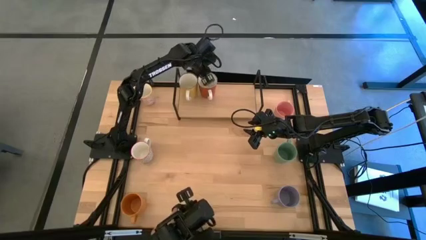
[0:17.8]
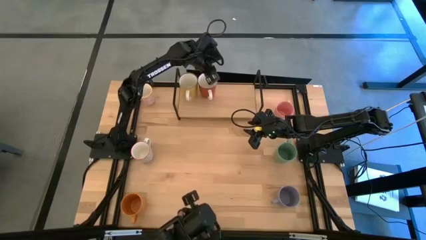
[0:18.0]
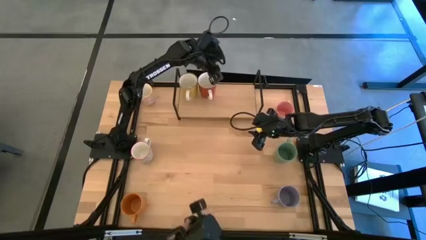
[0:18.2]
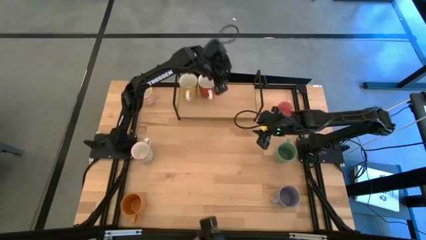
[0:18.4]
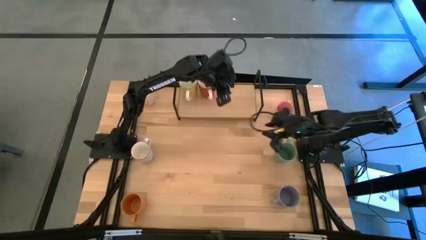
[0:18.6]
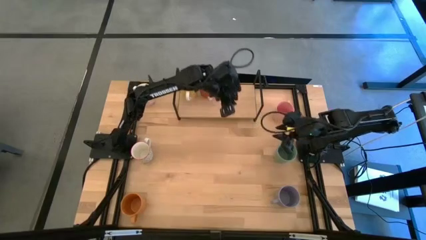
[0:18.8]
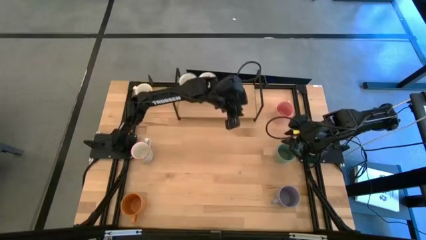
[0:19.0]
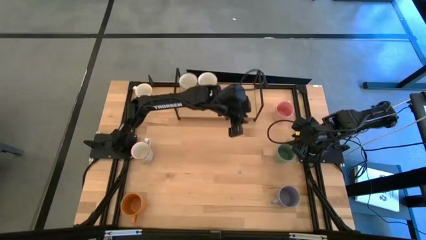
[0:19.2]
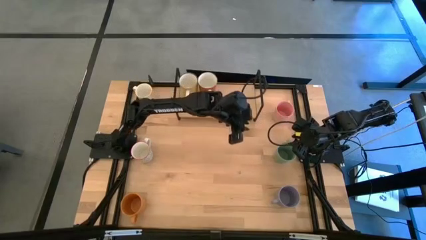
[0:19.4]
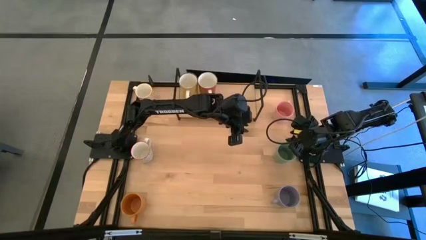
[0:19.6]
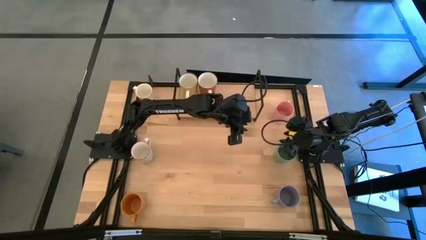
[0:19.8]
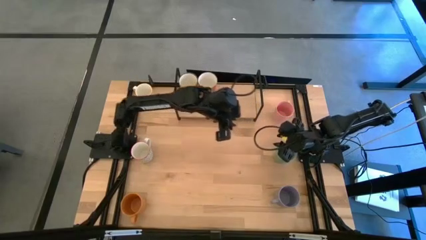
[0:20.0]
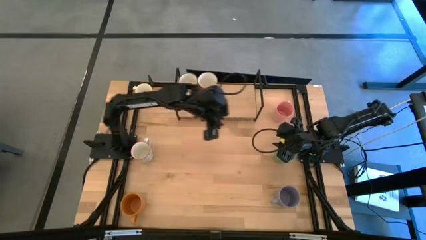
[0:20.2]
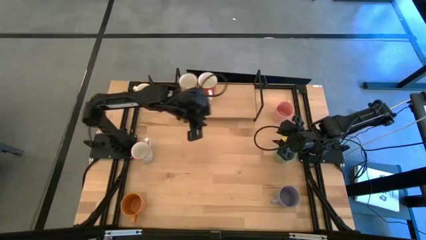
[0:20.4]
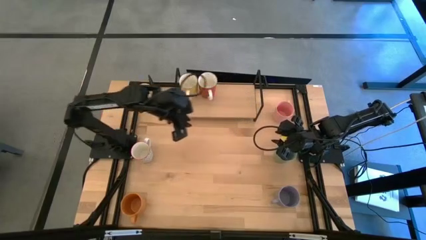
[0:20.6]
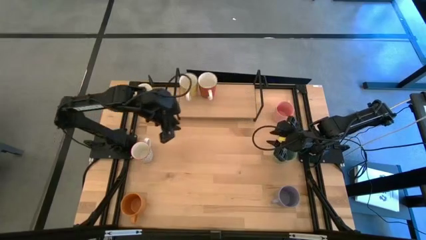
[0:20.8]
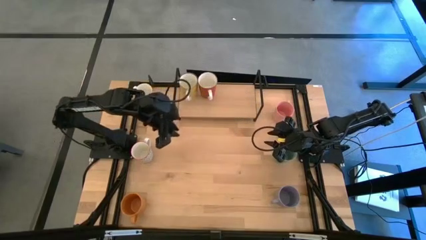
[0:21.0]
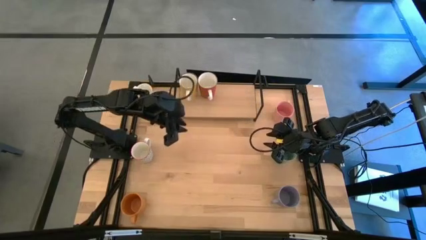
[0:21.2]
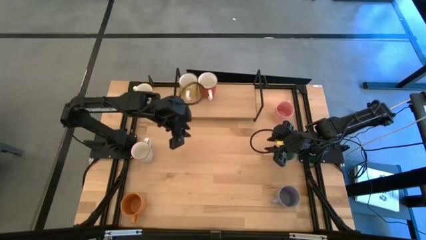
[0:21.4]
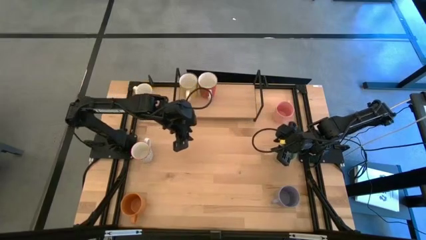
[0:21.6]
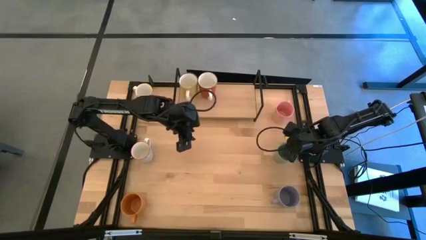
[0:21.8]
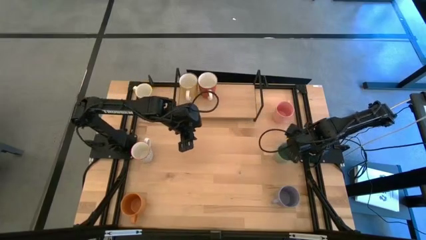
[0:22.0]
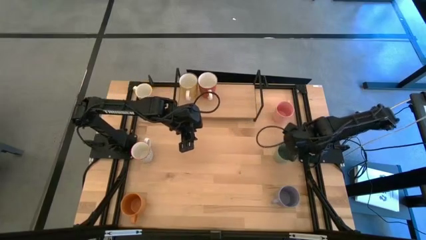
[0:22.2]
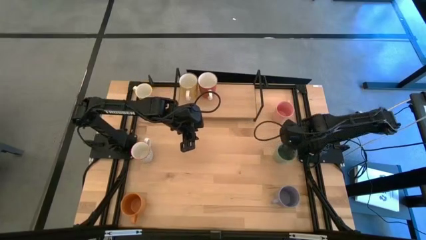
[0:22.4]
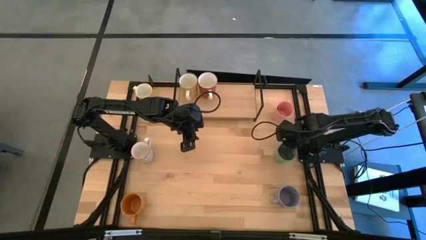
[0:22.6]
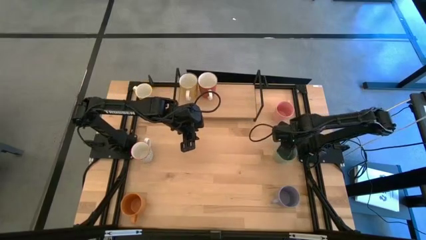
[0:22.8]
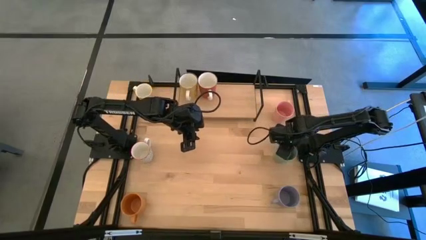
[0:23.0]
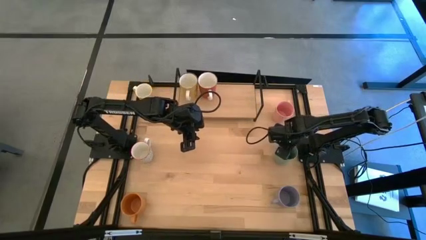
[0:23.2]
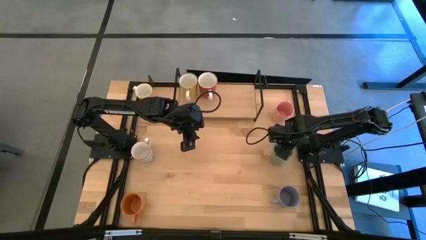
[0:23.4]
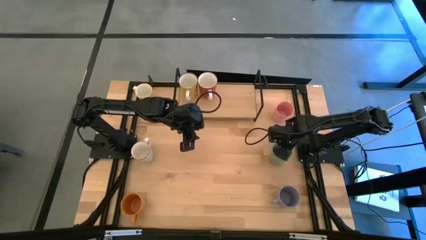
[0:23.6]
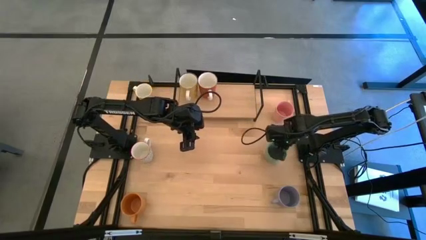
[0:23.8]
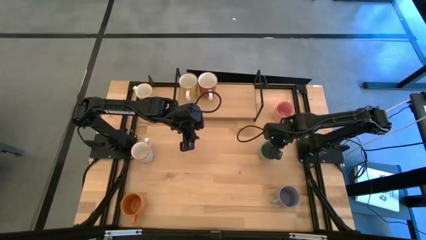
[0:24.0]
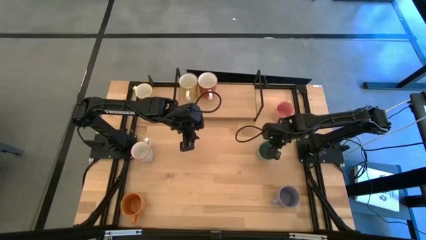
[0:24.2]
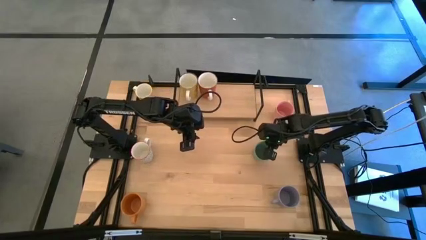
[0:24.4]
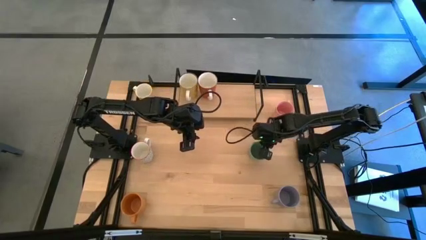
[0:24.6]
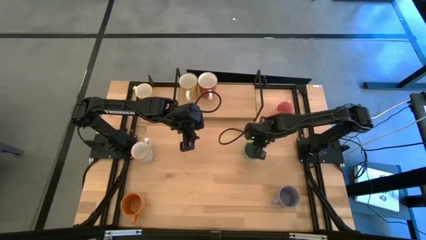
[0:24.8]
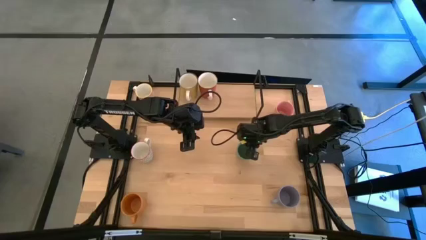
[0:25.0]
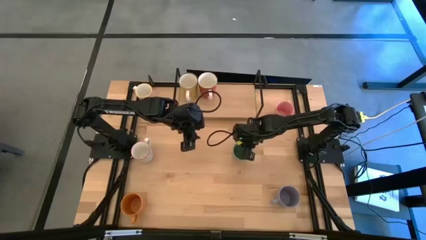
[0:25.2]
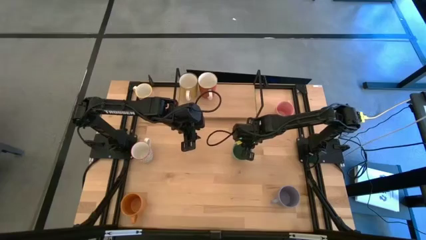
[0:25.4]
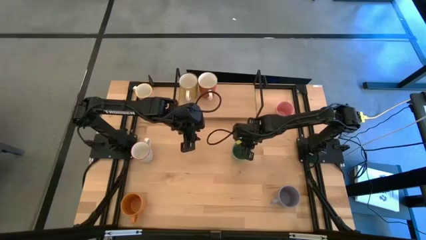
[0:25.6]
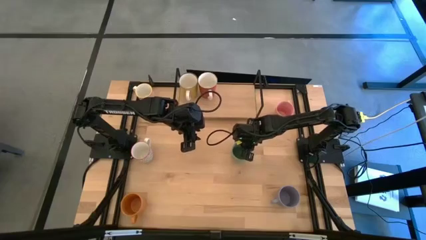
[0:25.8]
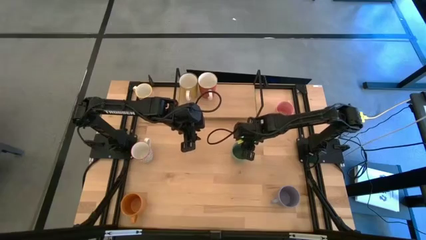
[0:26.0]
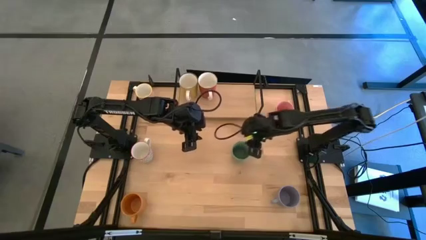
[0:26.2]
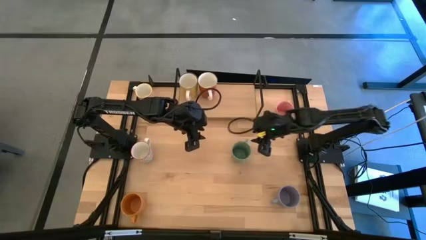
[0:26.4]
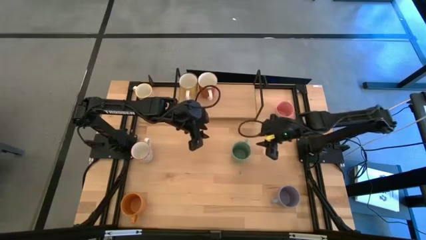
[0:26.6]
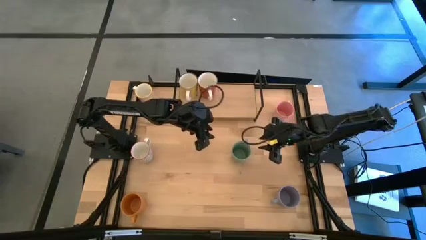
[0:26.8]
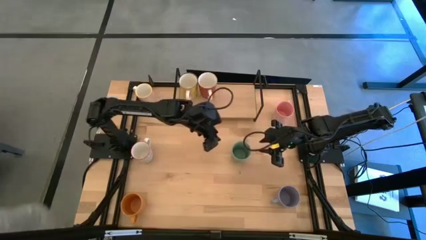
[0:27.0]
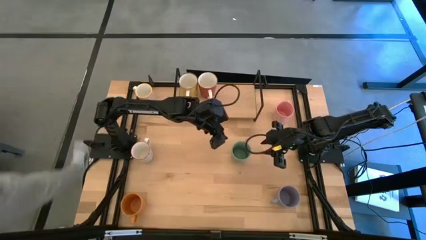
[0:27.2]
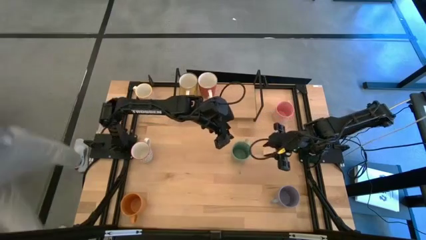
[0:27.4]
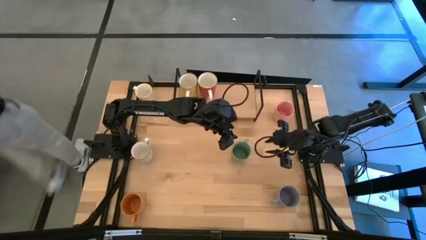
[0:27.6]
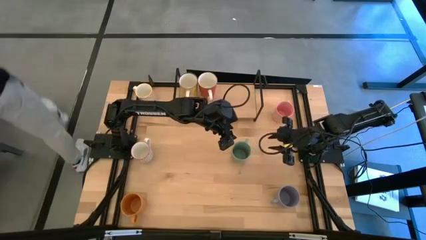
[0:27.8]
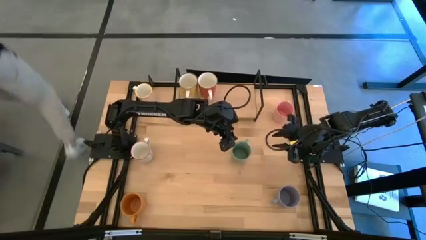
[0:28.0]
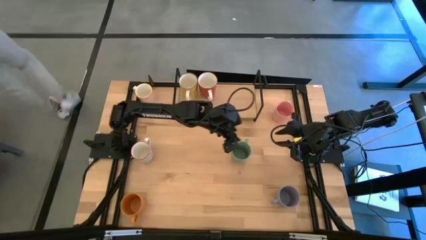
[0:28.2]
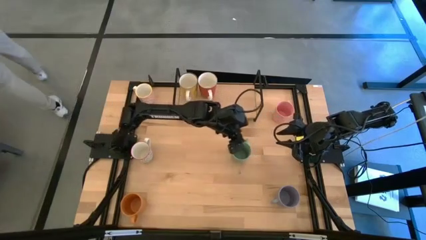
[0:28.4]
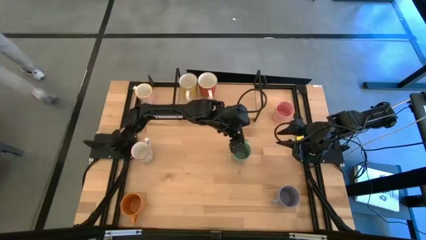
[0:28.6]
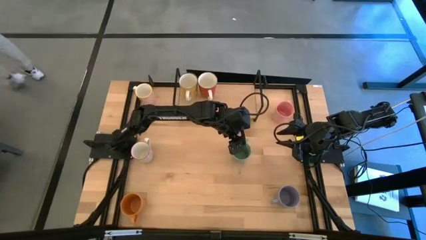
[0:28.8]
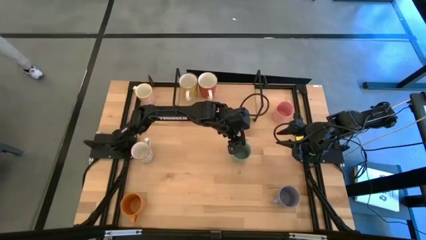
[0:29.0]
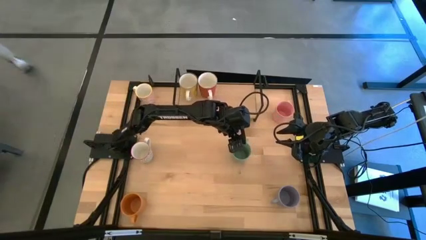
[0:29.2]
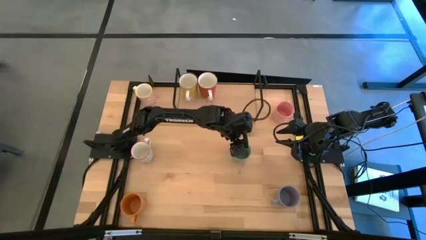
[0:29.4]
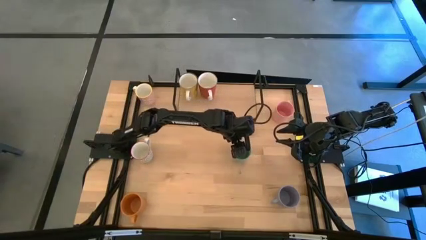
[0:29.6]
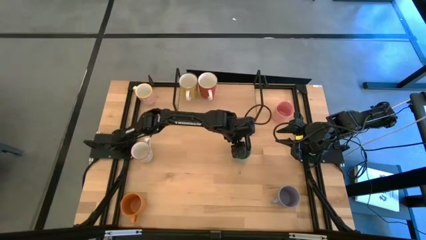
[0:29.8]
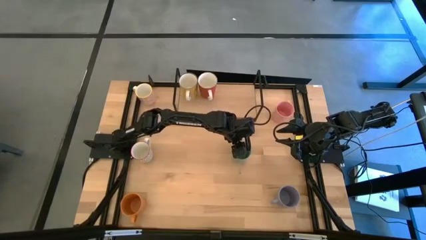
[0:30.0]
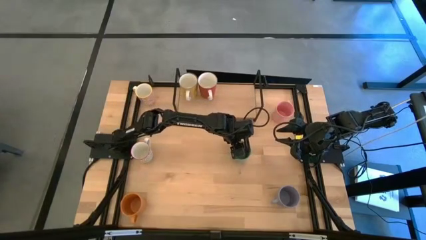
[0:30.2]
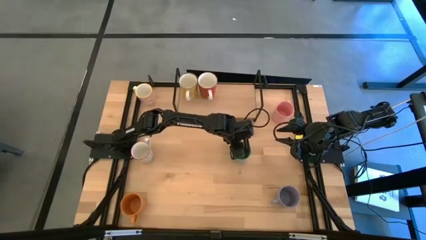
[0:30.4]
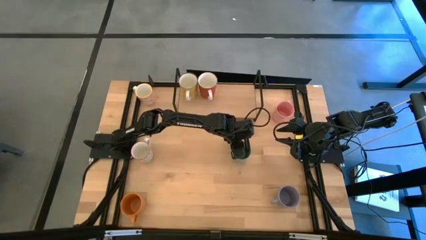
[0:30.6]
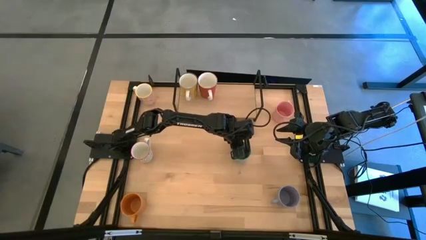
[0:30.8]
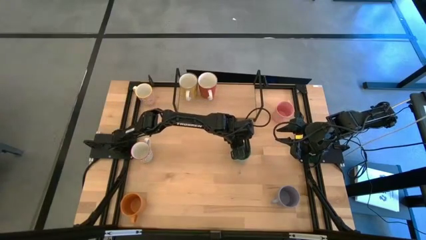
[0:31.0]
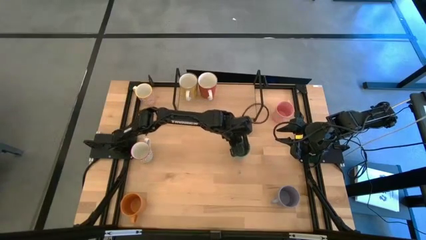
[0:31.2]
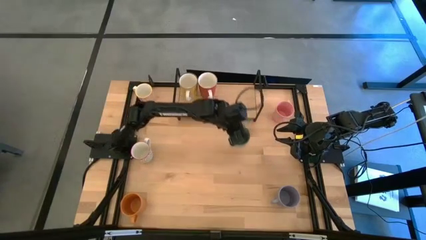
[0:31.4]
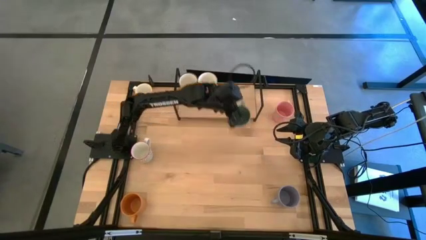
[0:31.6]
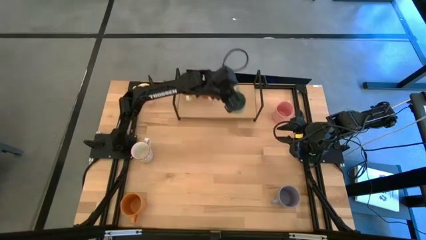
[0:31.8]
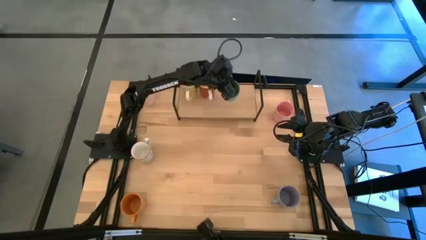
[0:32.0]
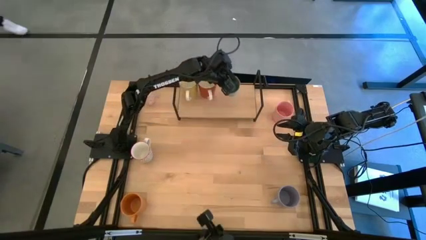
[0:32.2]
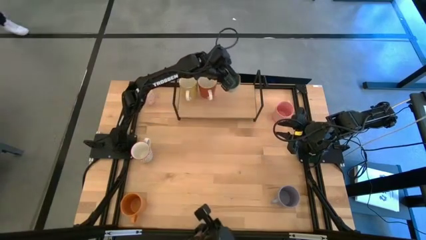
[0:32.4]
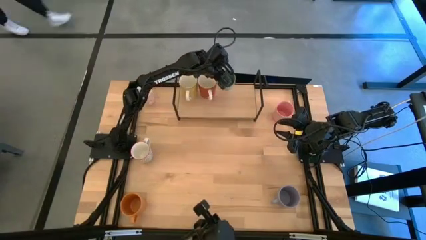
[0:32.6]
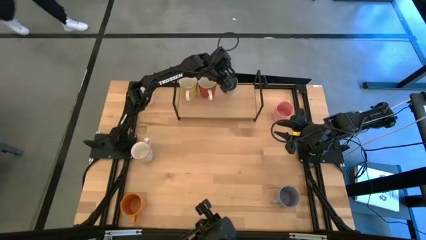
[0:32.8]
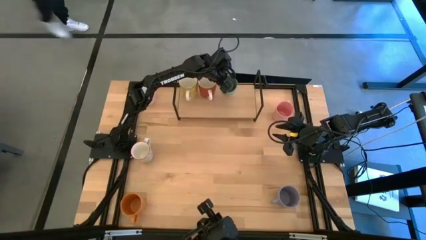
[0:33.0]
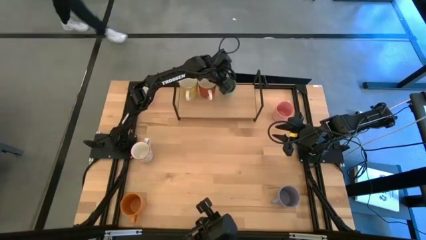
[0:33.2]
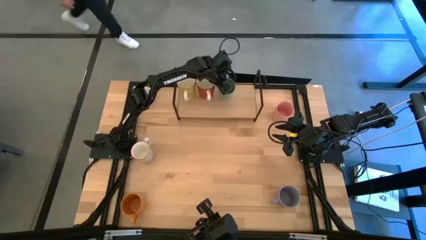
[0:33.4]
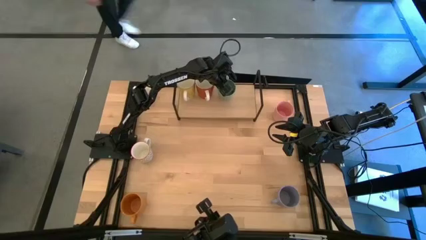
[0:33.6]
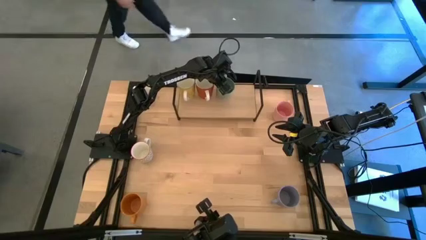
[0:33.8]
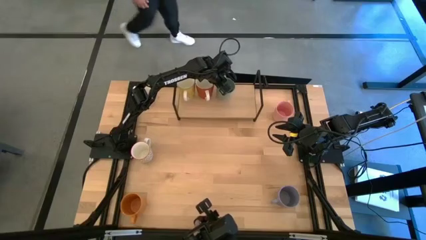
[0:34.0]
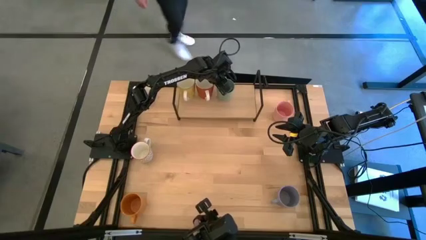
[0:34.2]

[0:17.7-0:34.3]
Task: Place coffee mugs
Put the green mug on the shelf
